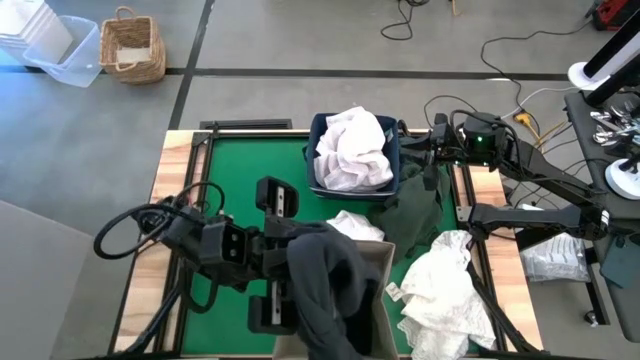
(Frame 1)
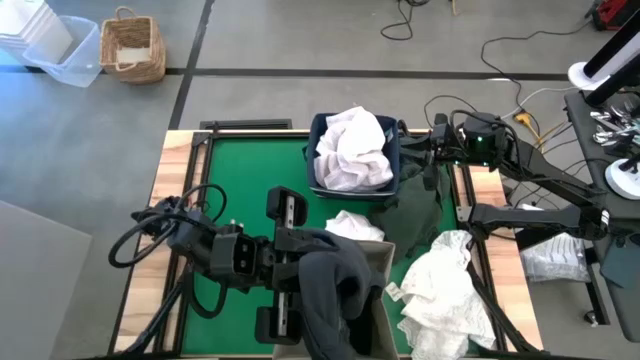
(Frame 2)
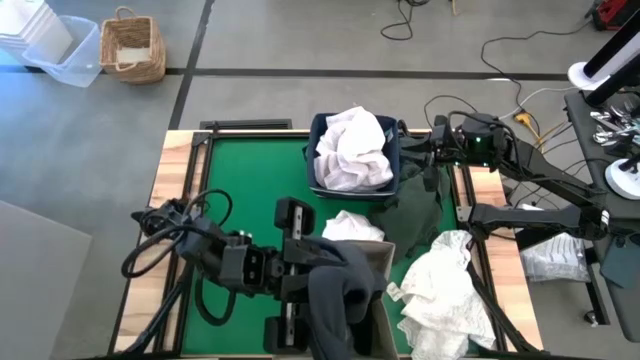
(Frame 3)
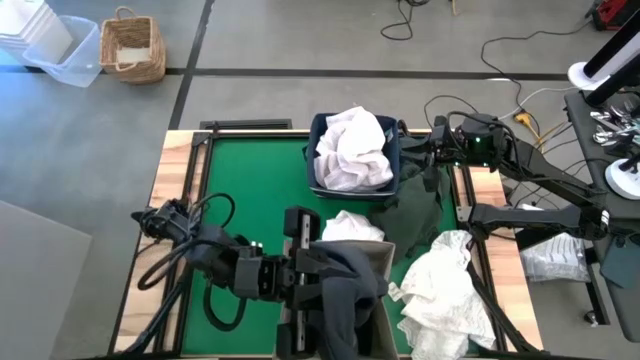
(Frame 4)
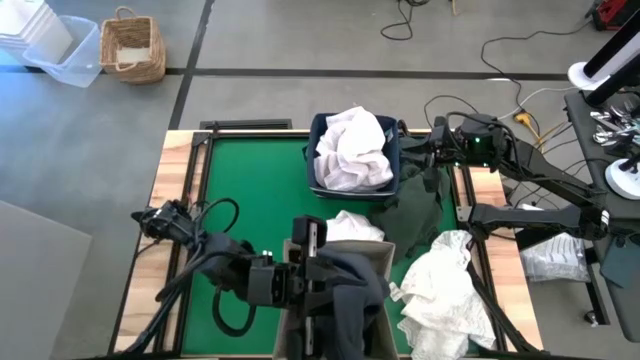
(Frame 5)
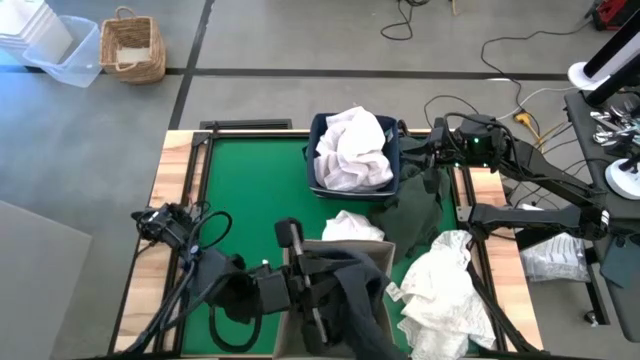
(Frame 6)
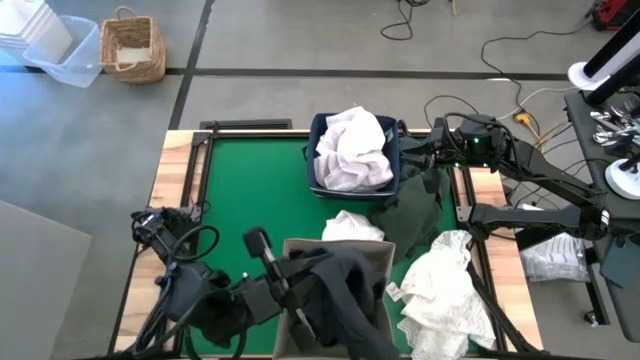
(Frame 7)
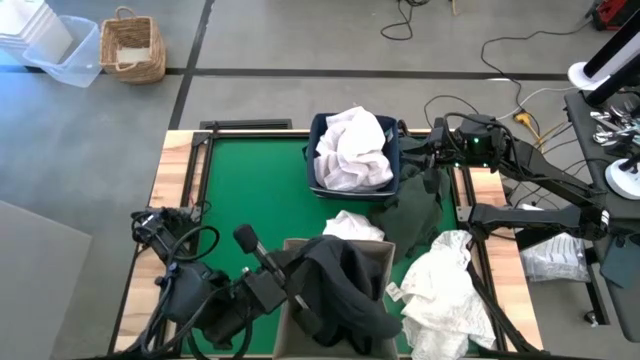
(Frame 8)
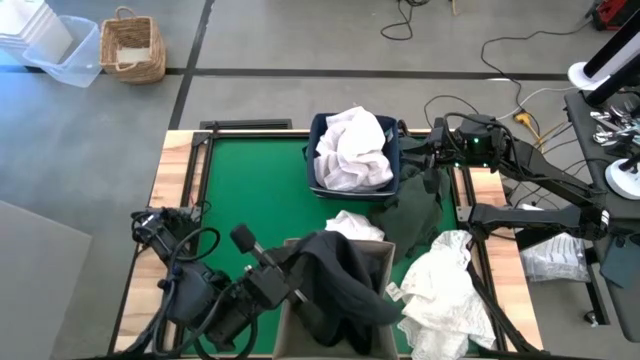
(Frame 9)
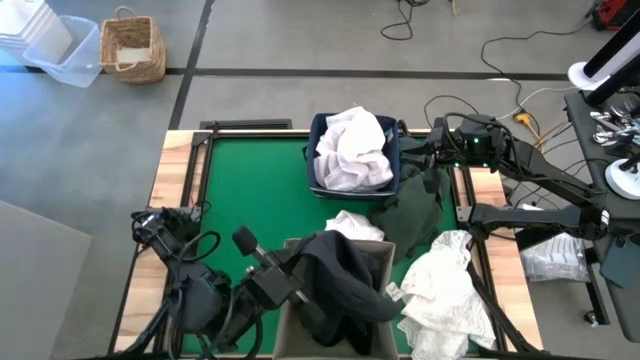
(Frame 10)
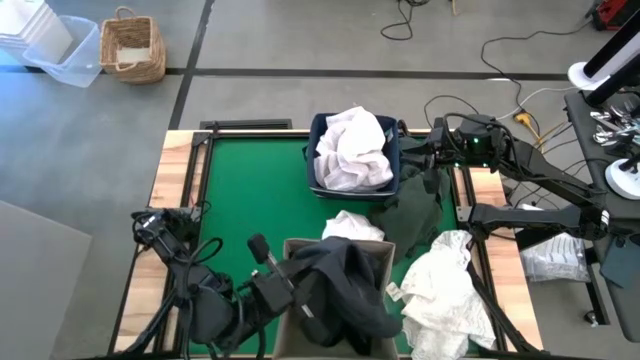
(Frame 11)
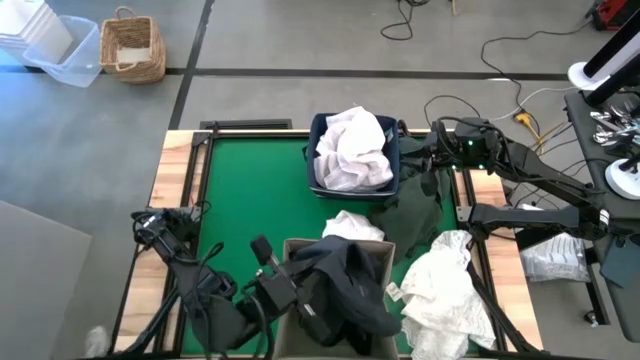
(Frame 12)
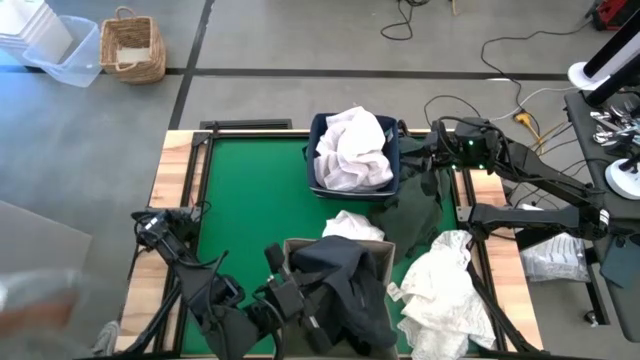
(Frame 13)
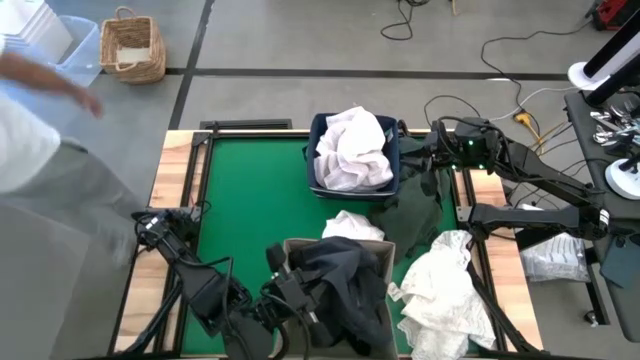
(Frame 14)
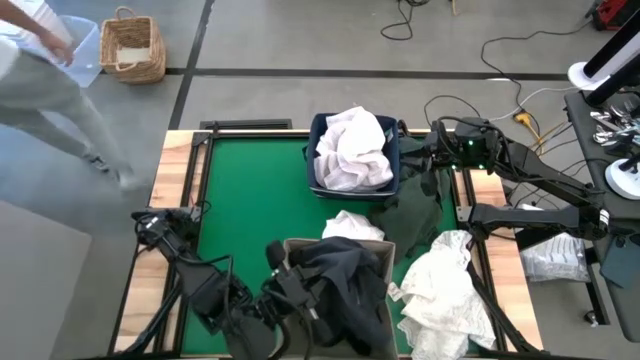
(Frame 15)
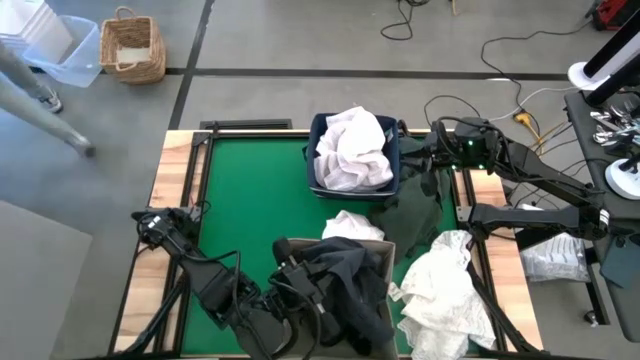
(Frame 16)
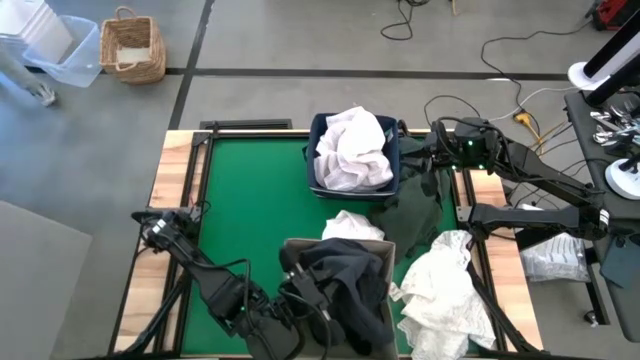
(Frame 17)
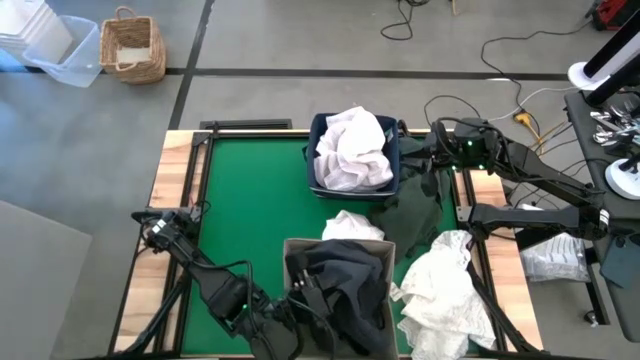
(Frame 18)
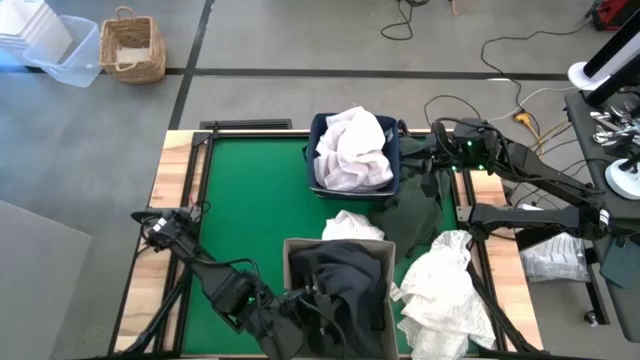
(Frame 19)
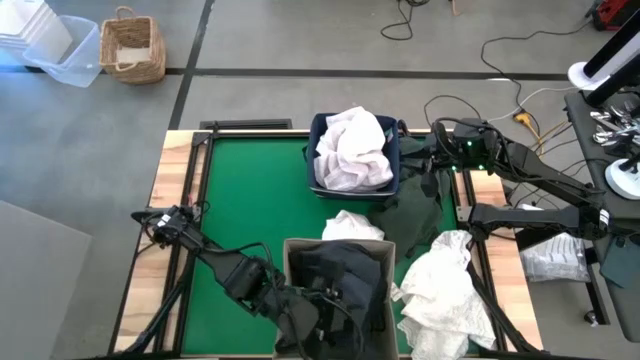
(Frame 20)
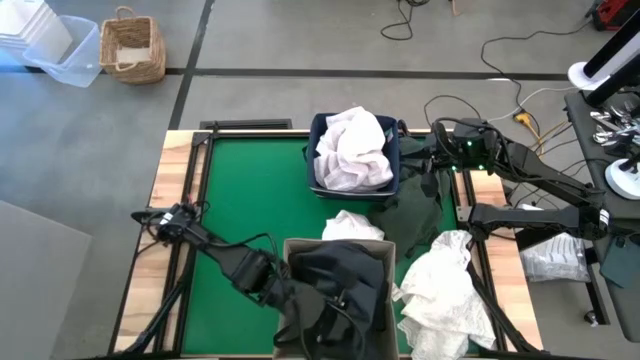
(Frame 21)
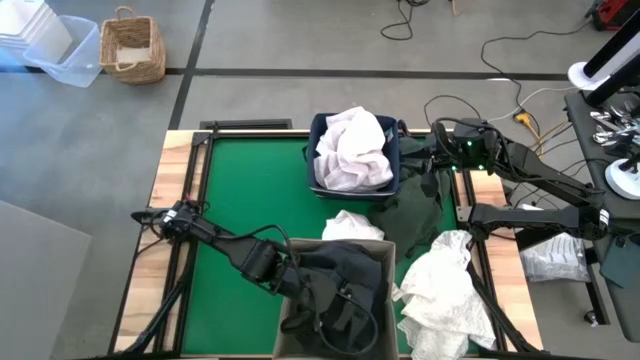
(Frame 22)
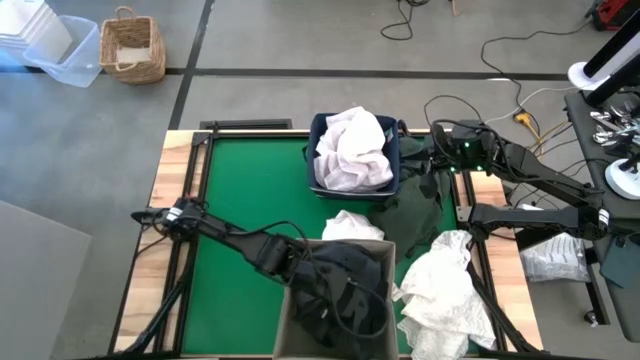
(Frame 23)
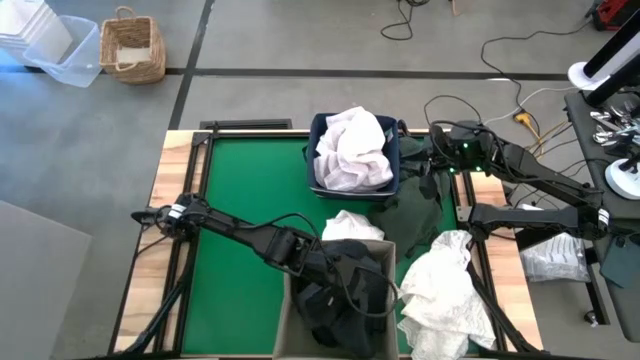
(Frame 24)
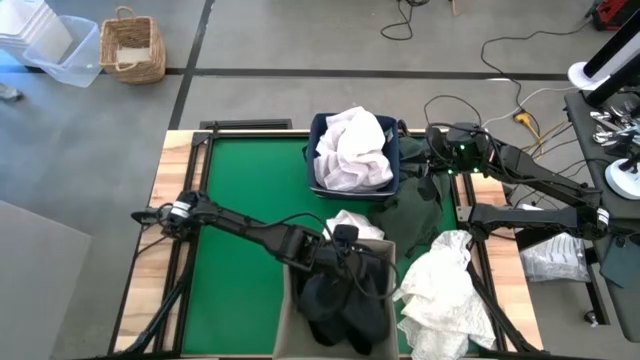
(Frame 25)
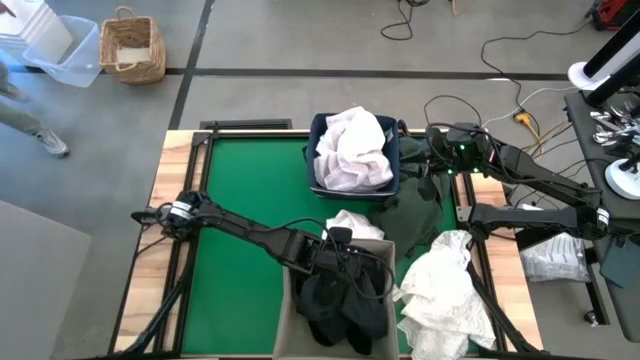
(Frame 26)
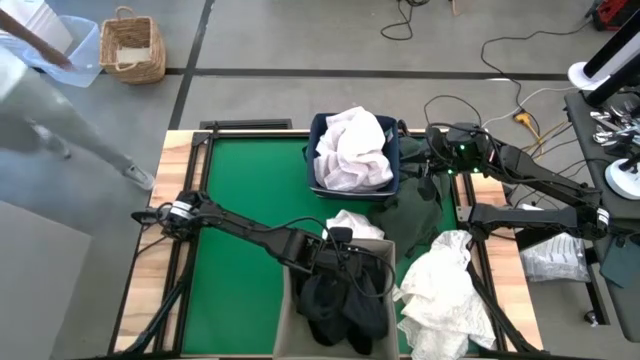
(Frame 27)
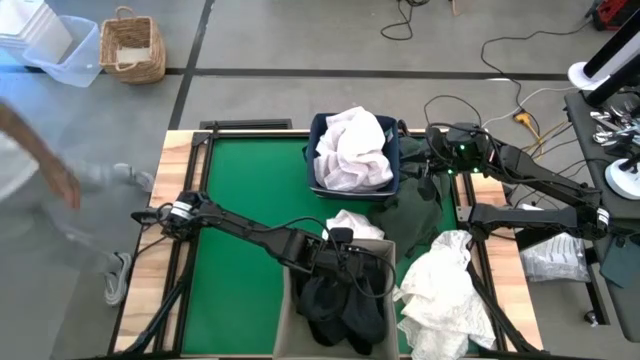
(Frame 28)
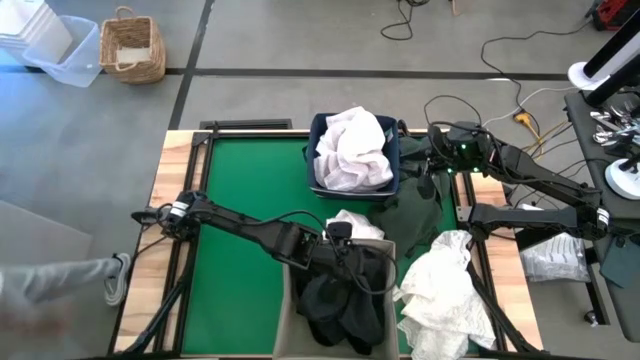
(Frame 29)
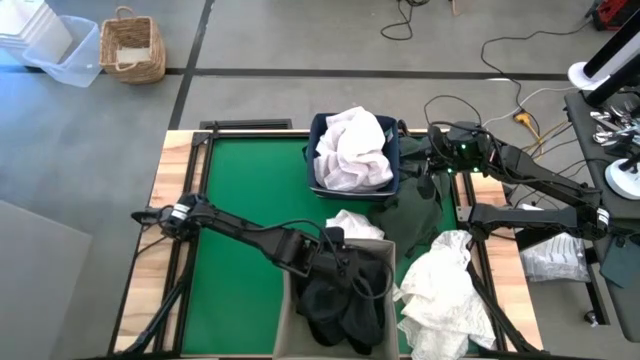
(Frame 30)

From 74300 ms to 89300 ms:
Put the blue pants into the white laundry bin
